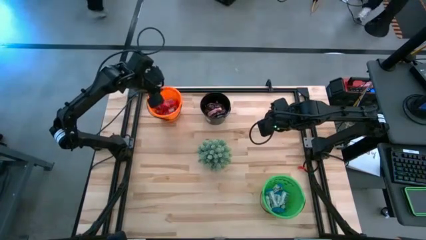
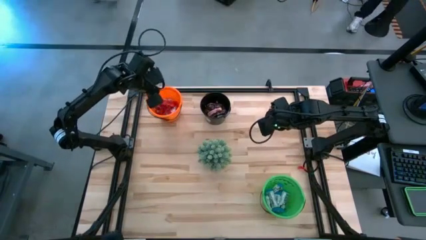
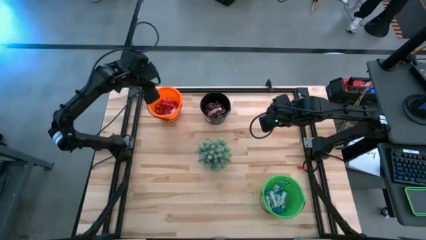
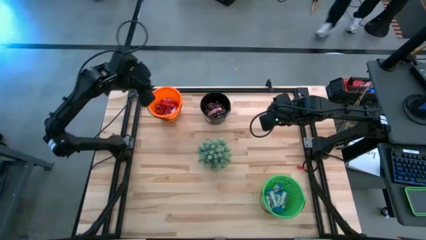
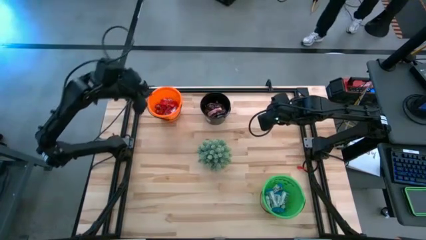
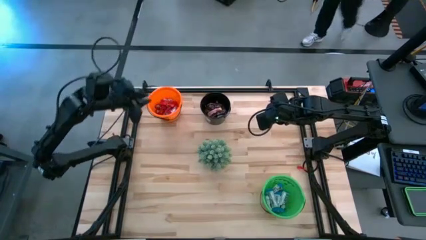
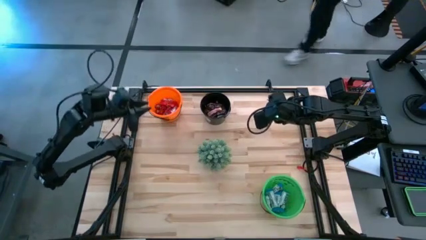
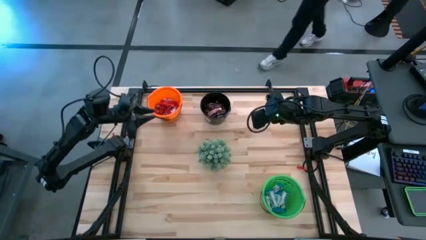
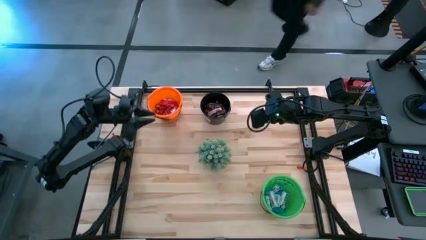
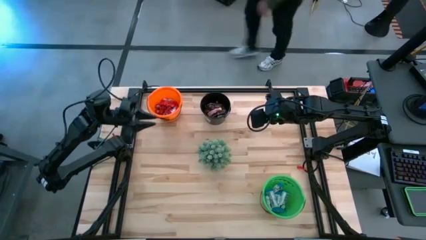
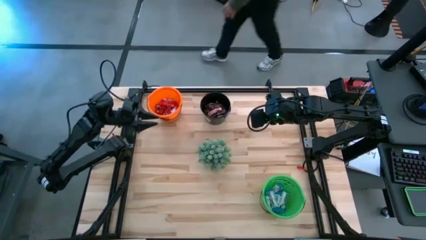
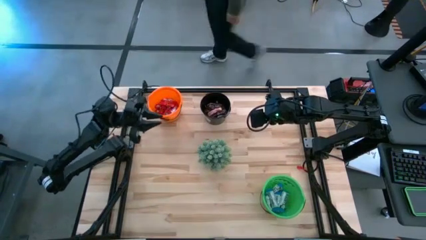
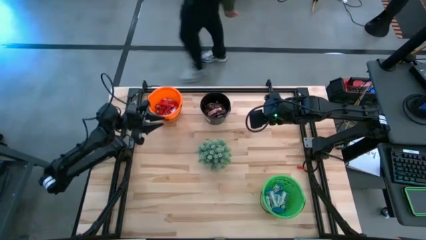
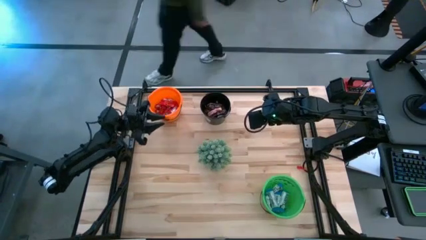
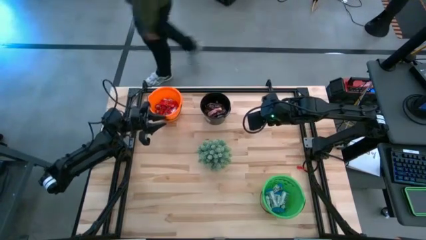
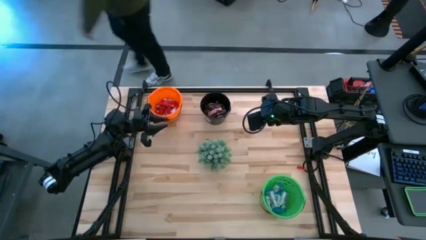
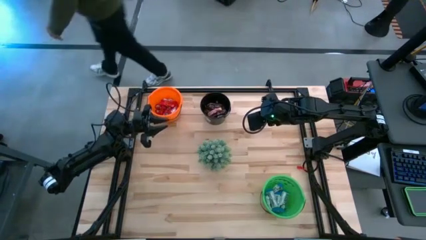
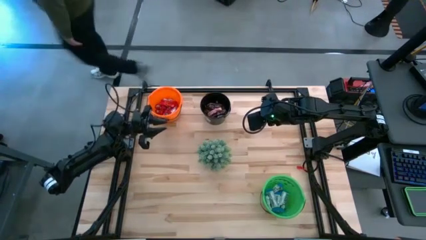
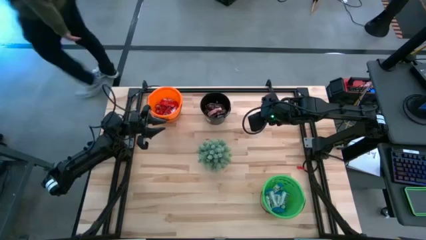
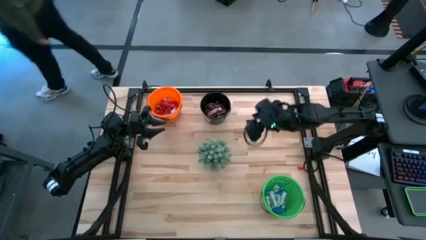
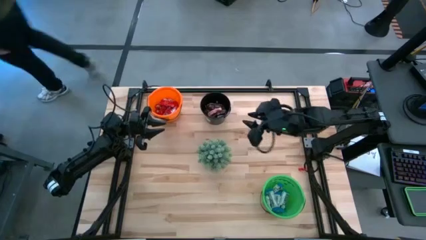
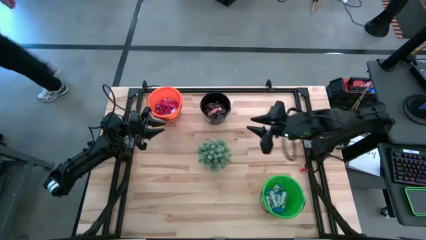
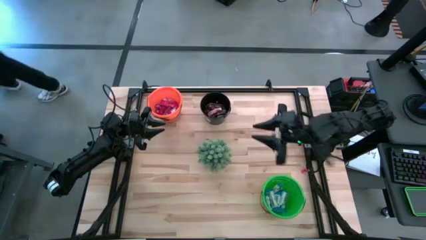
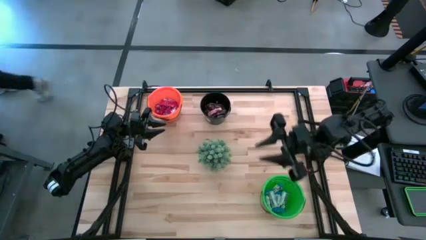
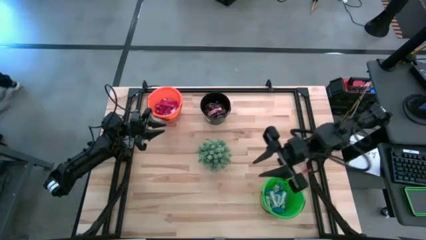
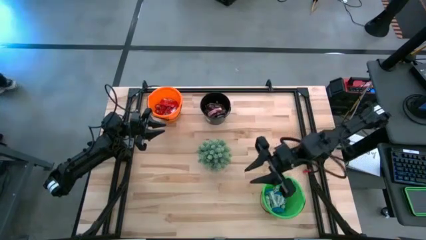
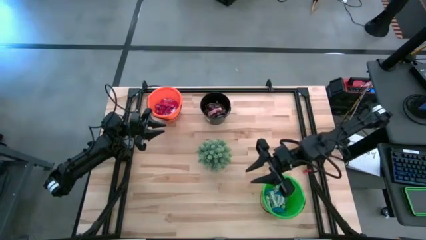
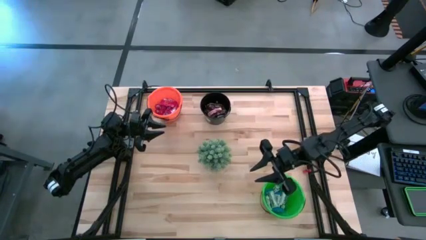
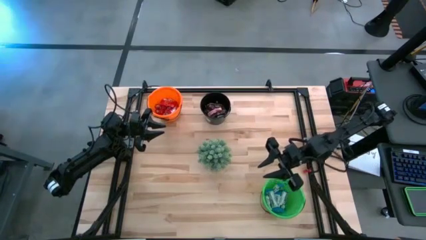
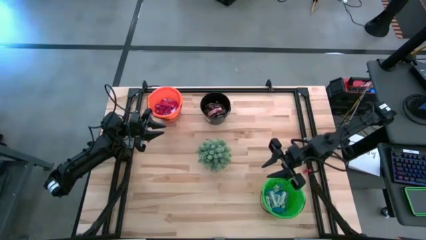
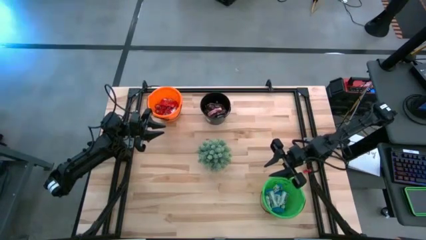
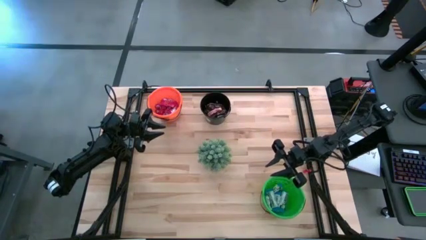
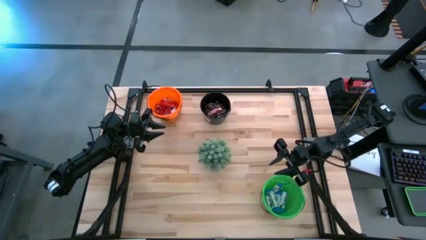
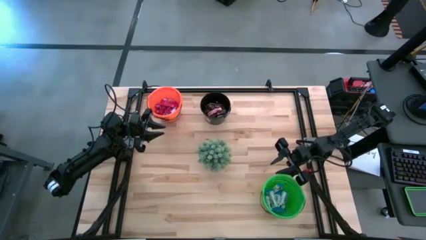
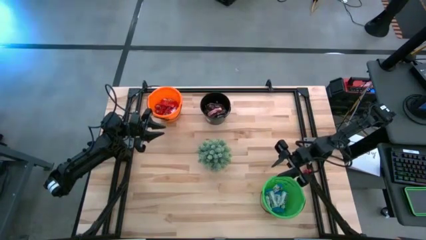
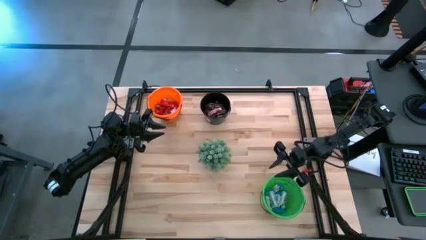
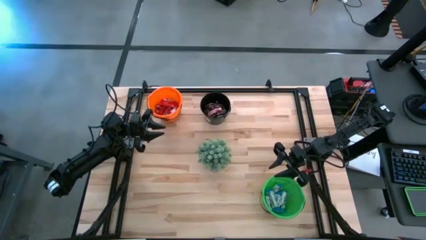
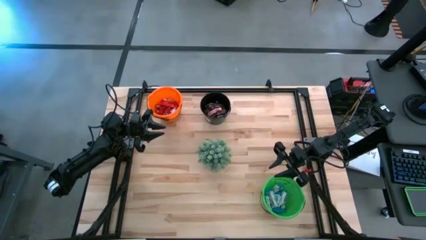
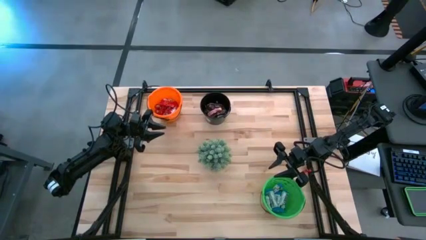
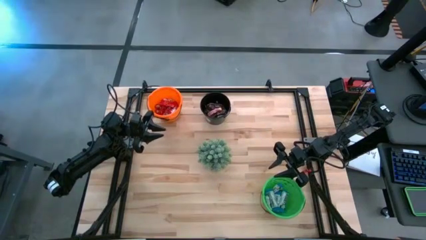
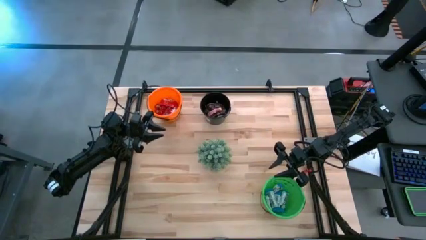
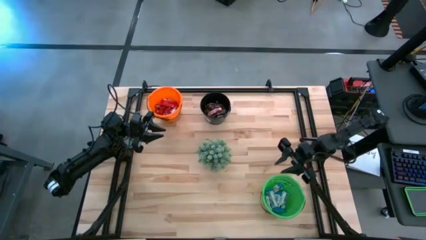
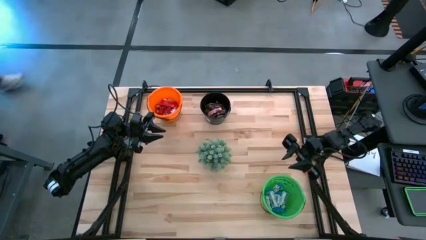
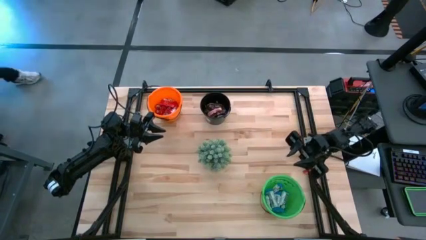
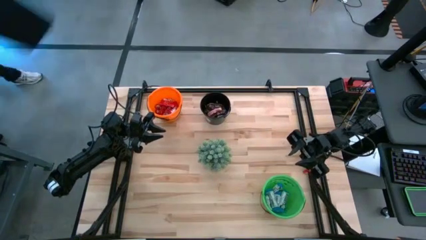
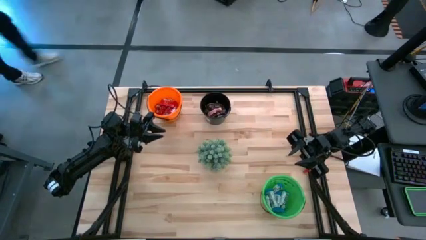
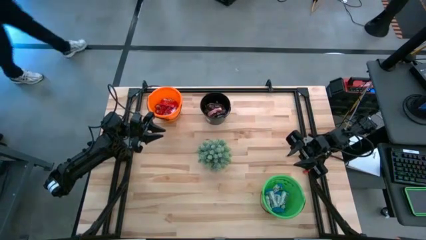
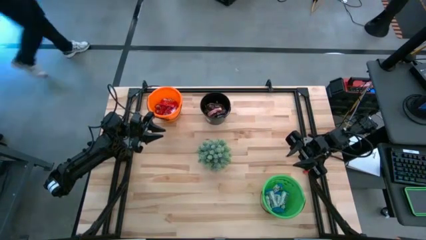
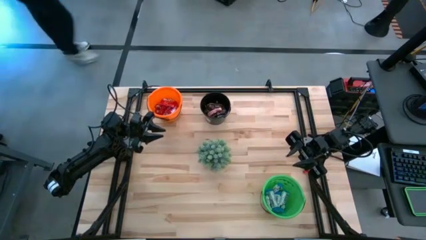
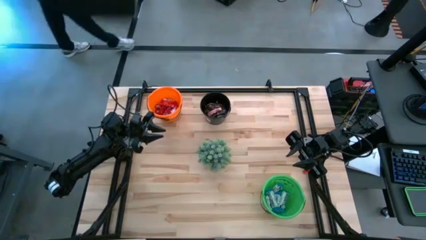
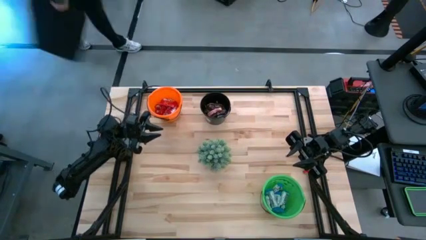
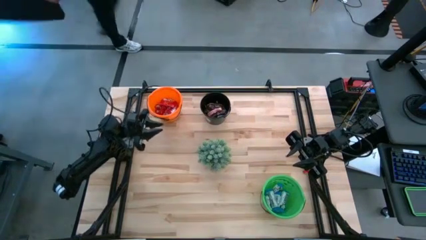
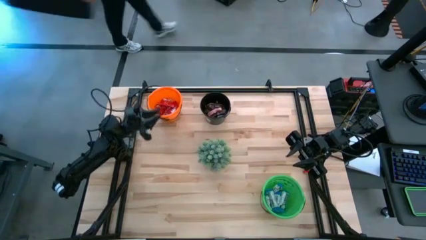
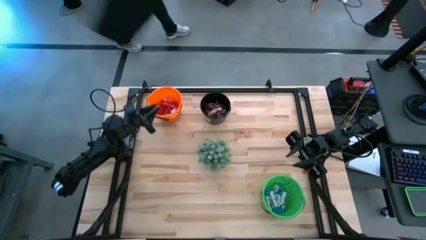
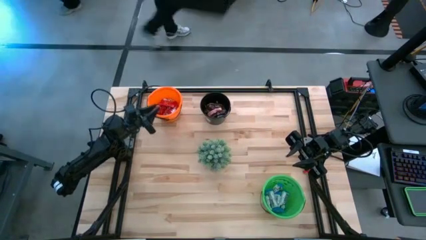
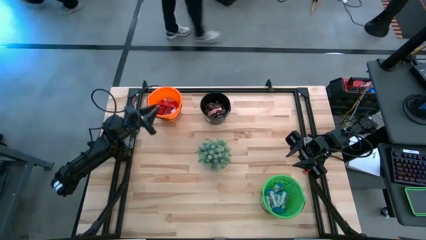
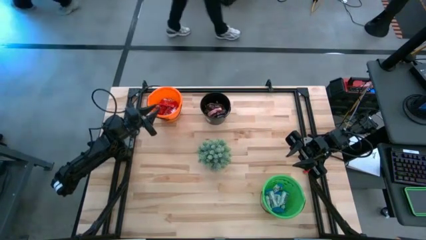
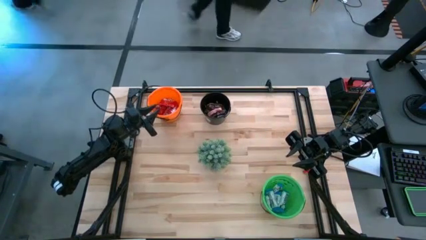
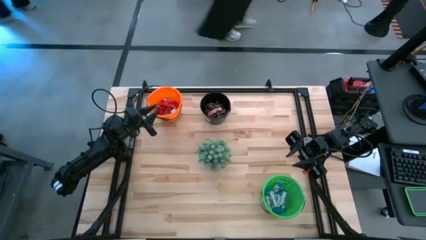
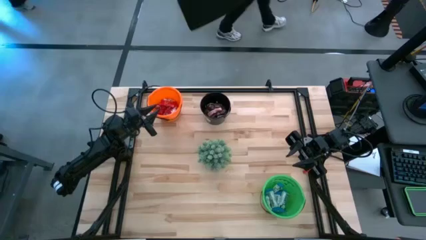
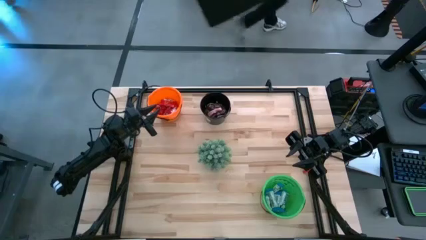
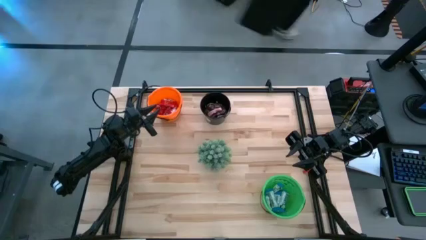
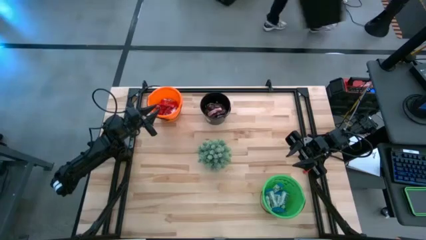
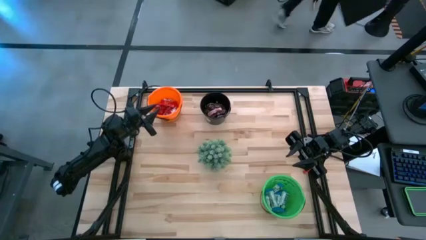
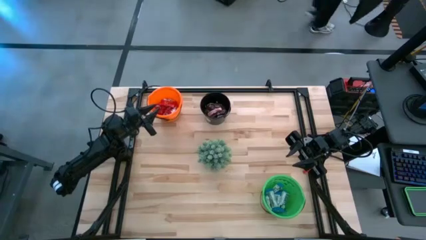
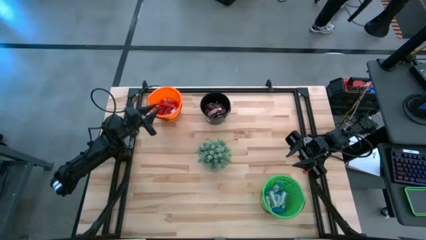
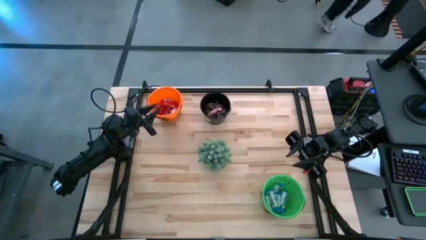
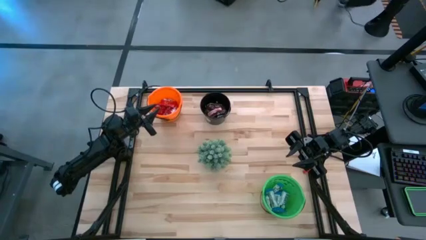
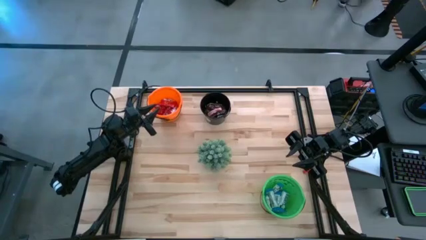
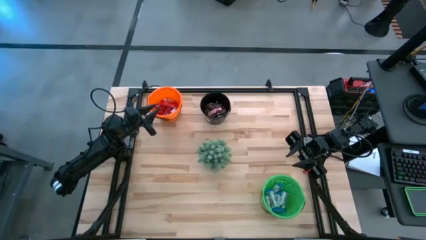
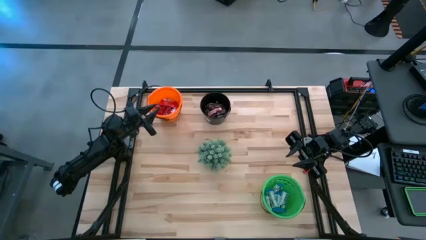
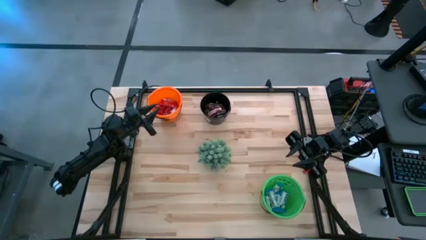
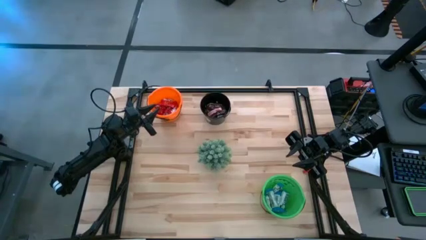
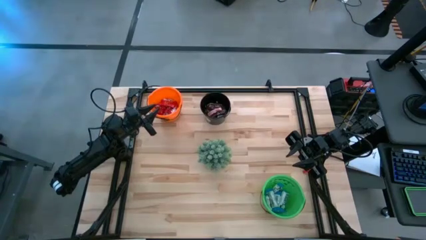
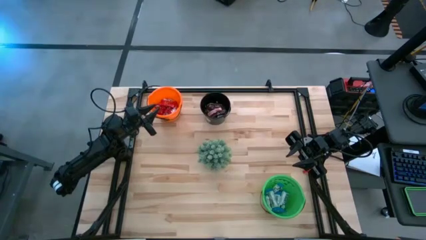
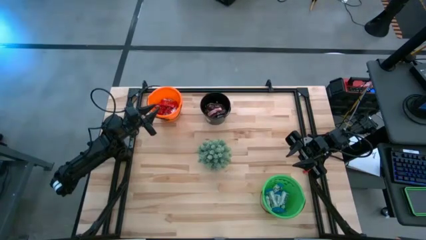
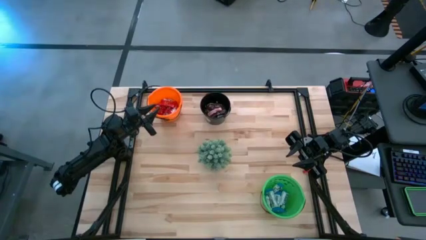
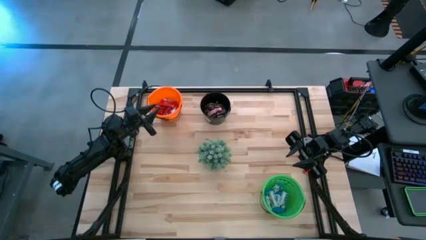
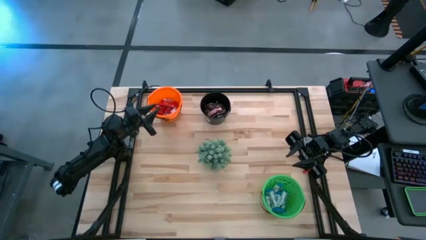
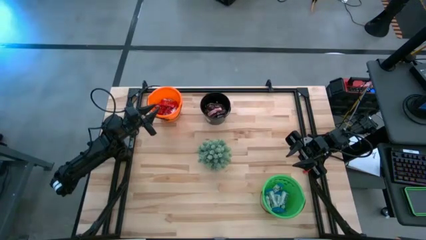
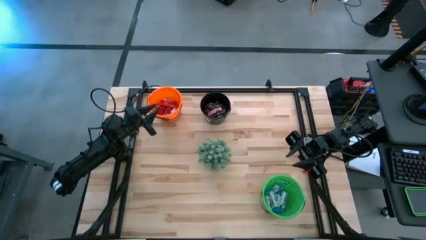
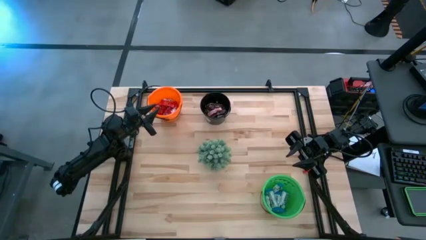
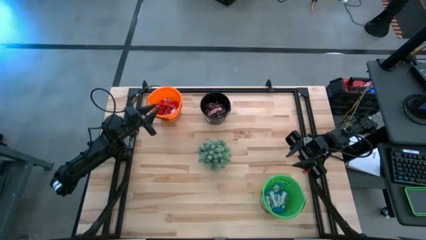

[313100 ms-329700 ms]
Task: Sort candy
Return to Home Position
